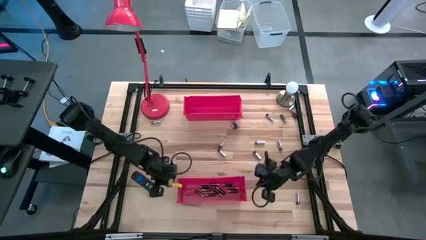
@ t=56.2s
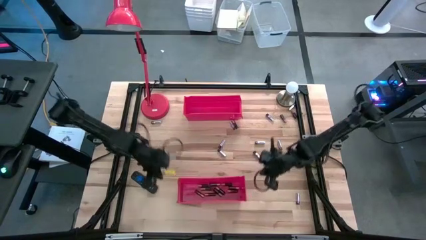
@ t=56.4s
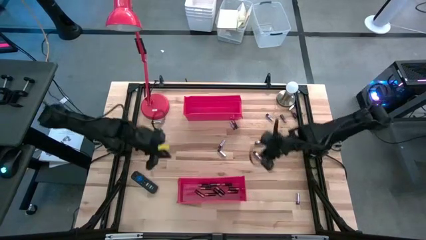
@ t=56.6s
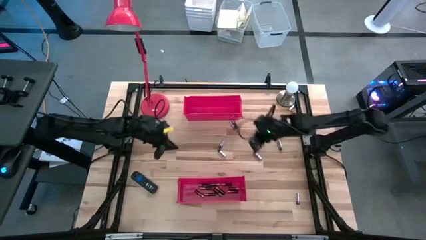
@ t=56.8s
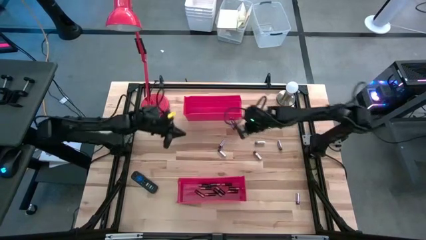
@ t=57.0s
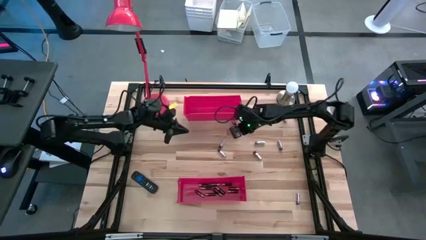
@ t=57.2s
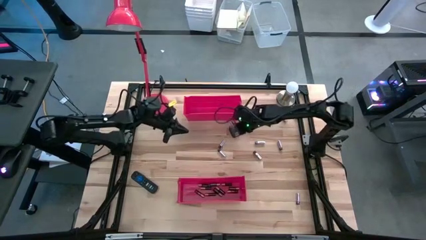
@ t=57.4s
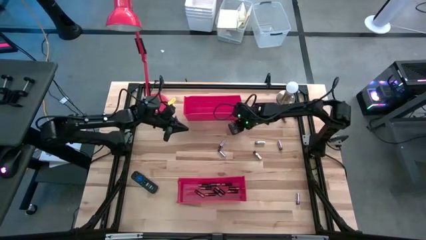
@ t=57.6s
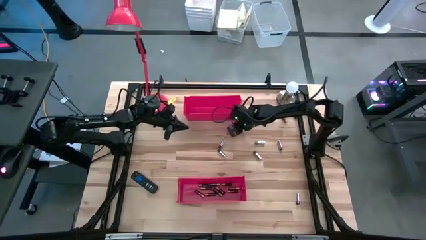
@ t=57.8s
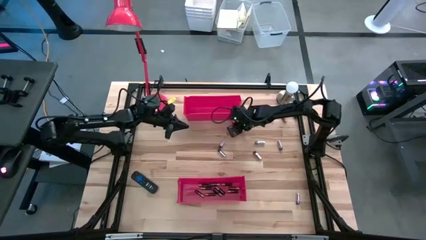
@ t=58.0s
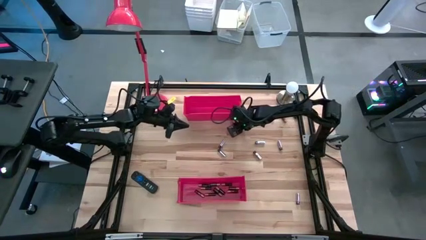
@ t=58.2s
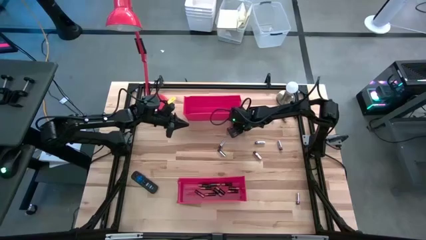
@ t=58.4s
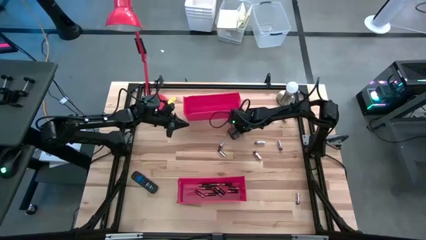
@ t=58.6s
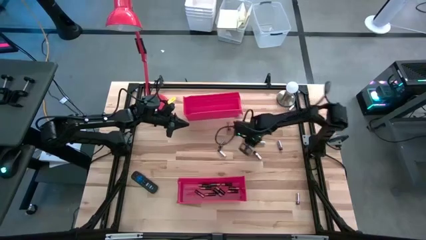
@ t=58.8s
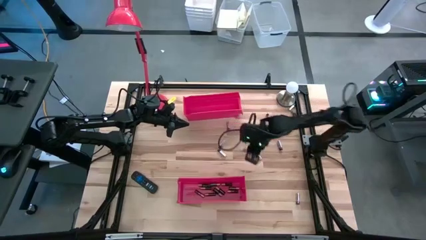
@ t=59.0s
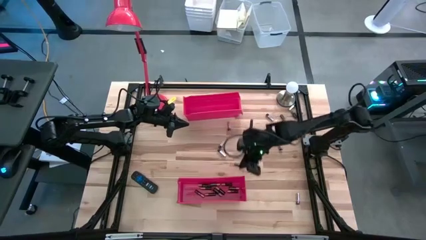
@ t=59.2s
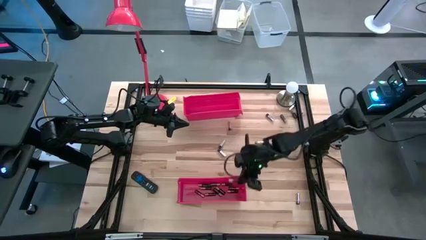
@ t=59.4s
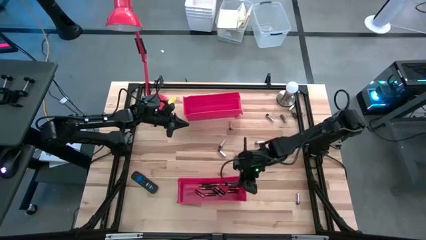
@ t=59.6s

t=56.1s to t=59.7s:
Task: Sort batteries
Put the left brown battery into the bottom red bin

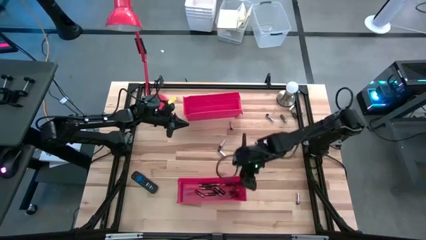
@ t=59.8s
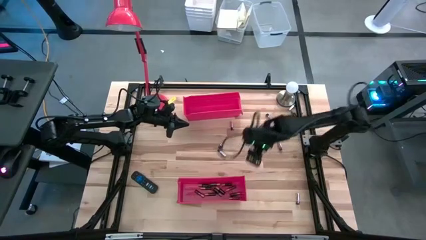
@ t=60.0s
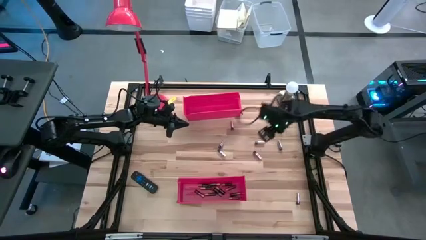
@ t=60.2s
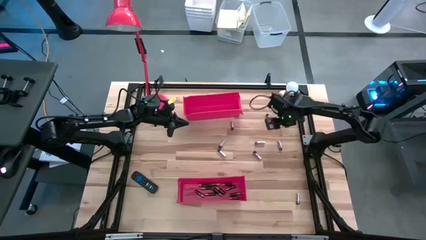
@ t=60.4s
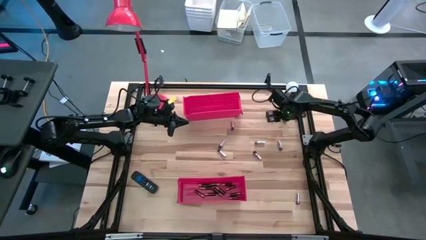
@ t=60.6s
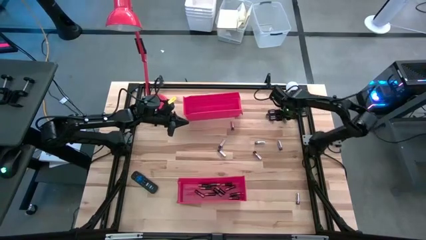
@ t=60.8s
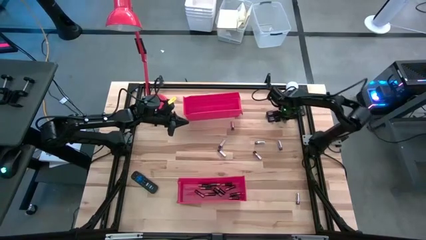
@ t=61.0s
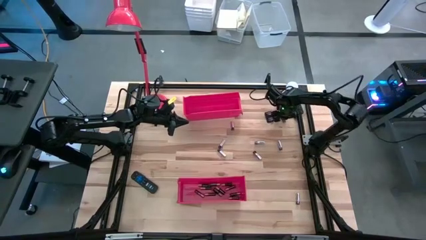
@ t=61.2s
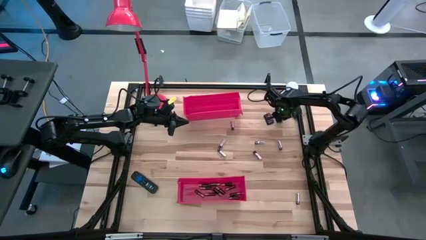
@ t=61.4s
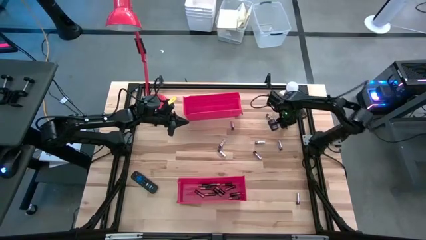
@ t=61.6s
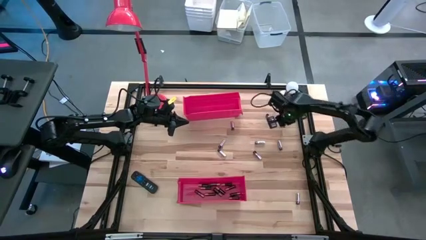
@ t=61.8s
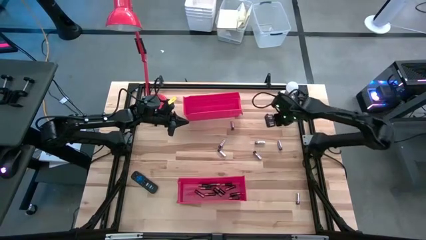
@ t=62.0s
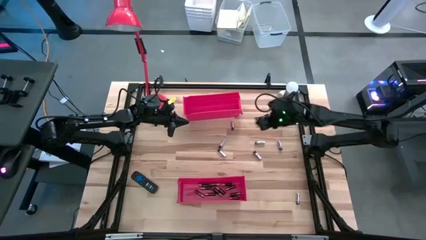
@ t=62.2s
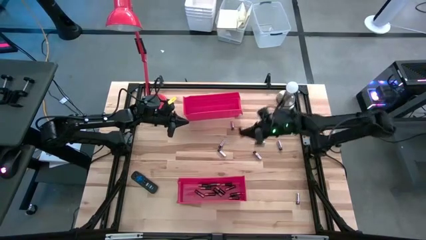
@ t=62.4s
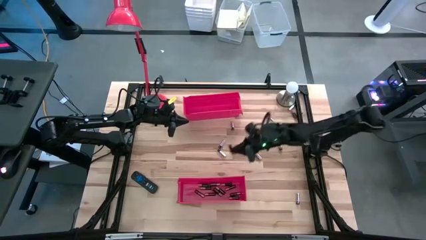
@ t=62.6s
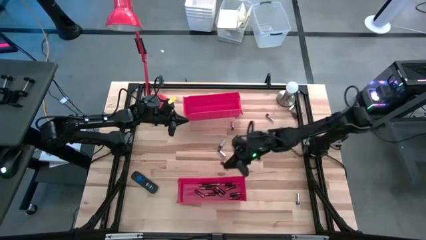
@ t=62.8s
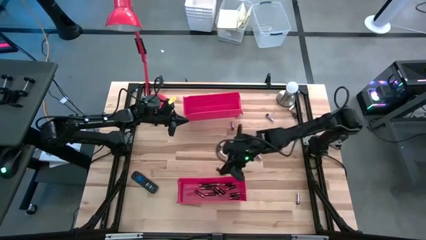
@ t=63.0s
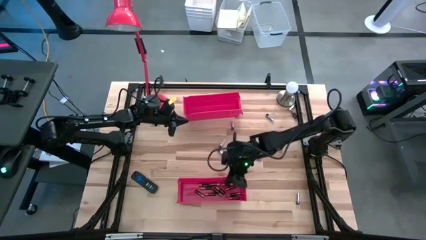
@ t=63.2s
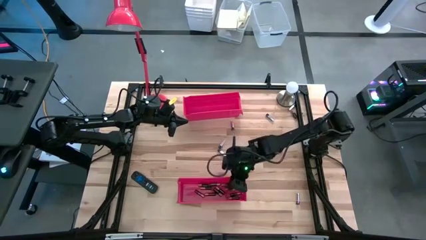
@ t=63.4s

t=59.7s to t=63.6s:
Put the left brown battery into the bottom red bin

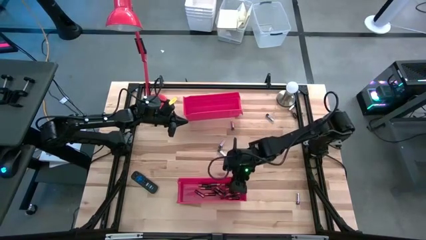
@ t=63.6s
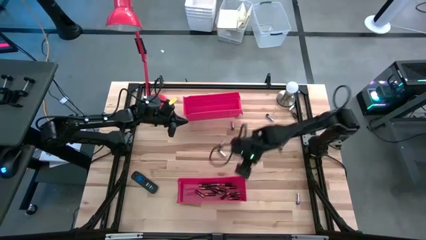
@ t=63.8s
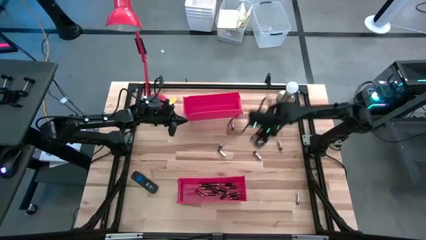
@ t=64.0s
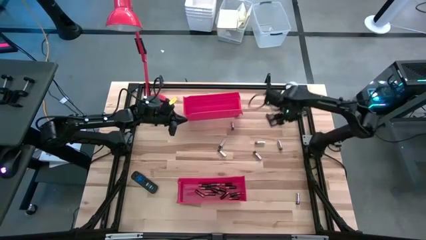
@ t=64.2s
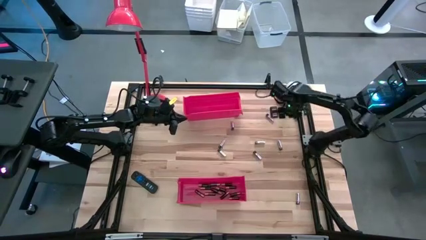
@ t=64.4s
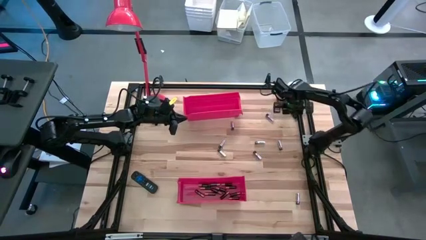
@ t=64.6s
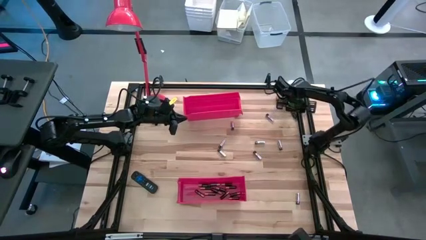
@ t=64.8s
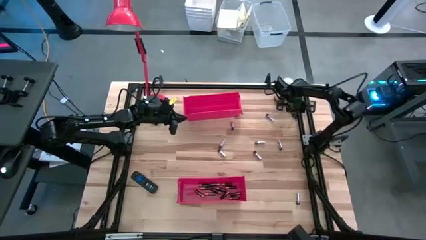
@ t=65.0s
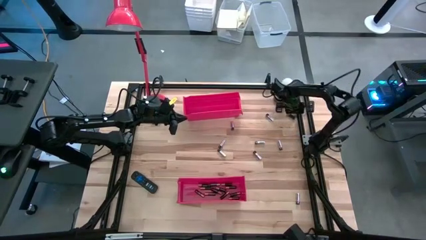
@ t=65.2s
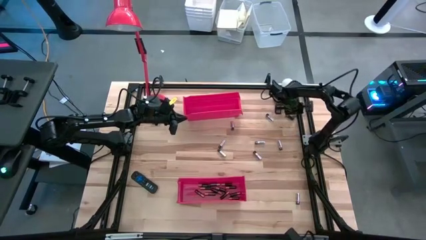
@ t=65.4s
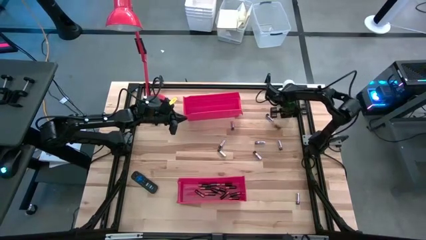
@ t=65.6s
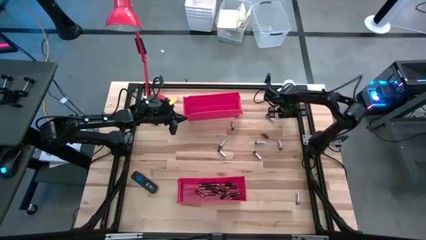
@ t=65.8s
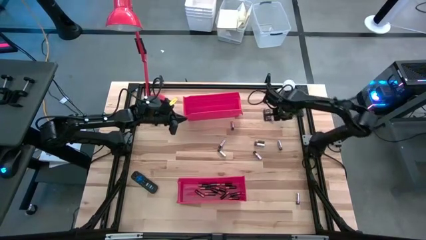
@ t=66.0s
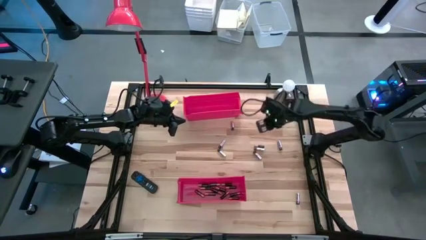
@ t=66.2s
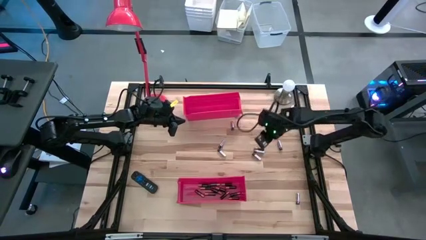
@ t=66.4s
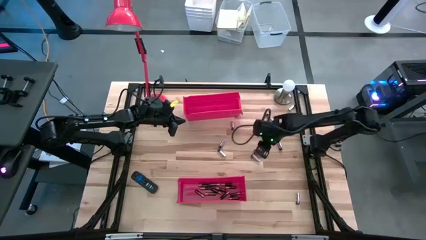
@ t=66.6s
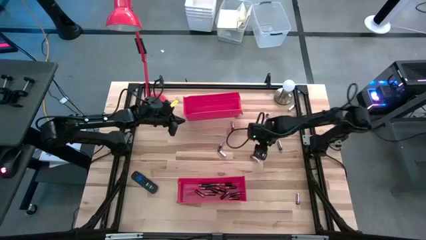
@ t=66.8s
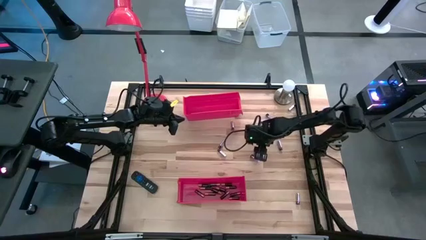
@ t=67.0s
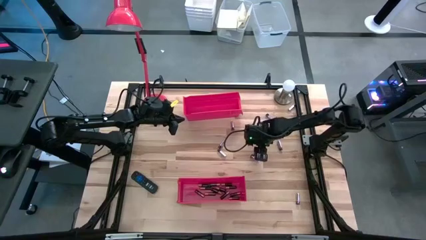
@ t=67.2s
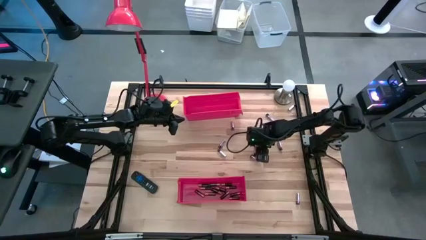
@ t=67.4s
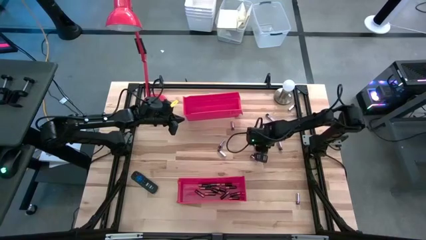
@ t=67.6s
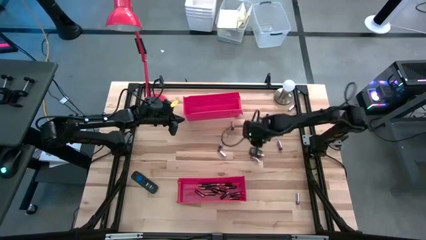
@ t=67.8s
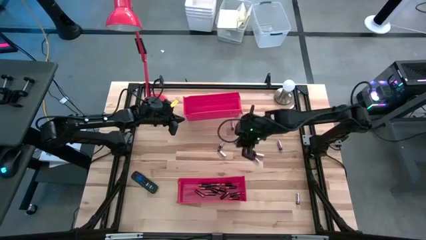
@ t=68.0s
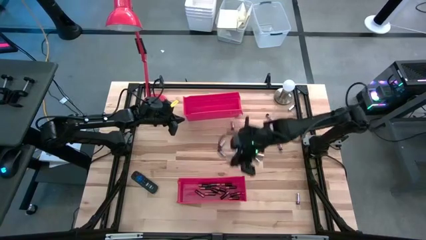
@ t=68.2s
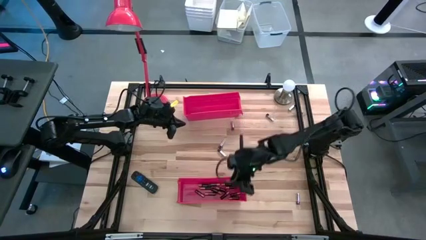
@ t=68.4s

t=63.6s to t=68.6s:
Put the brown battery into the bottom red bin

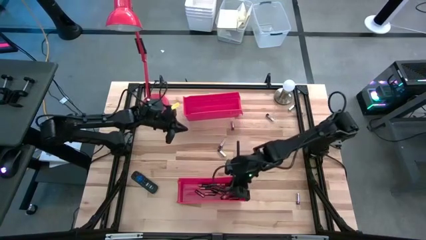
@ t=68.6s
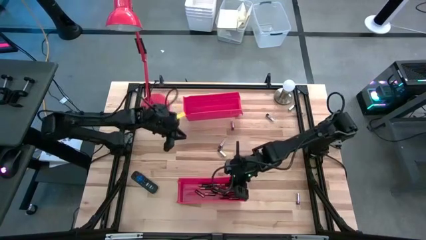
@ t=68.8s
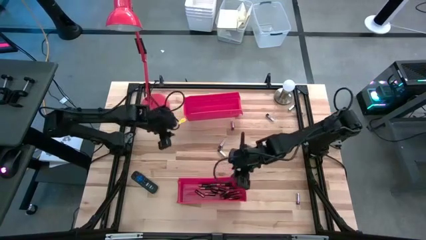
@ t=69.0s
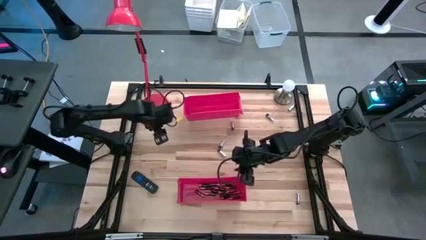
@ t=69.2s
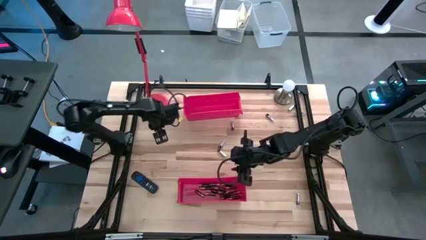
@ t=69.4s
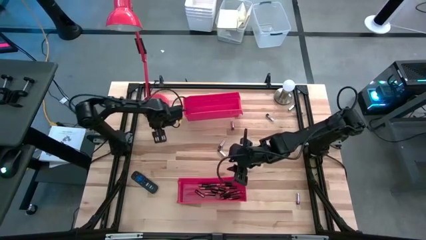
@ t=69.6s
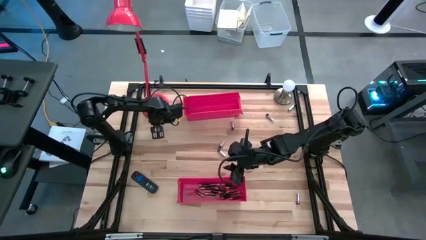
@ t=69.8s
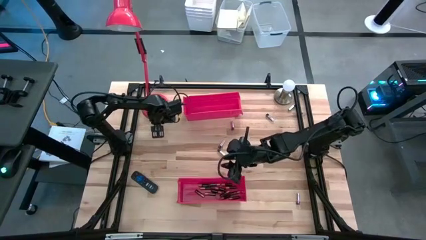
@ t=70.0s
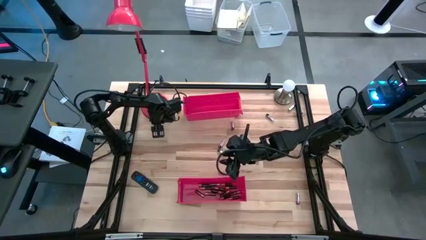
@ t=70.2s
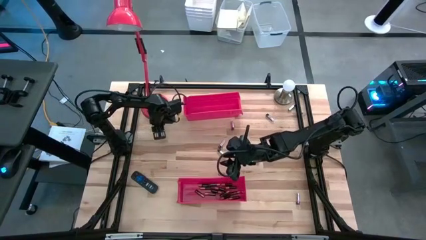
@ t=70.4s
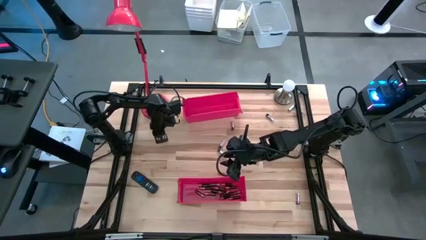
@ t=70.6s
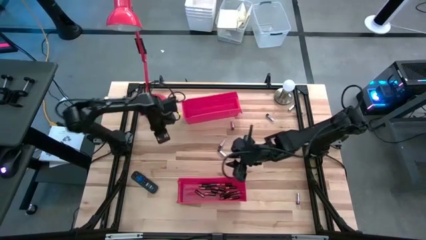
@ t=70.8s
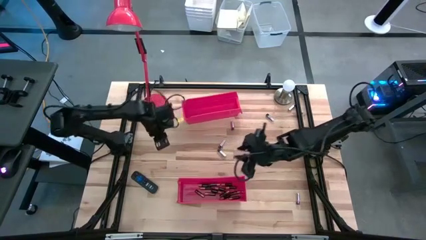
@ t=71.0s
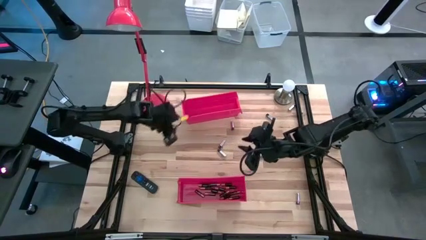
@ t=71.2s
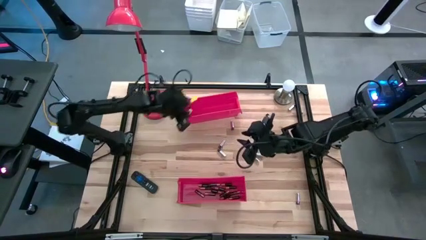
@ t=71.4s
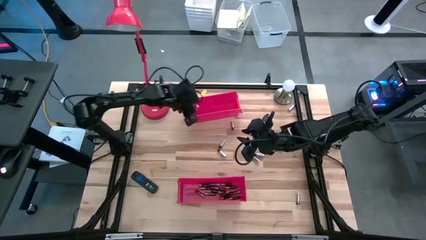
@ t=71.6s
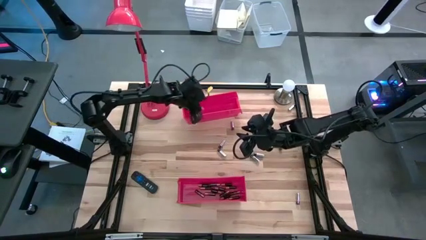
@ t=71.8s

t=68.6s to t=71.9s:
Put the silver battery into the top red bin

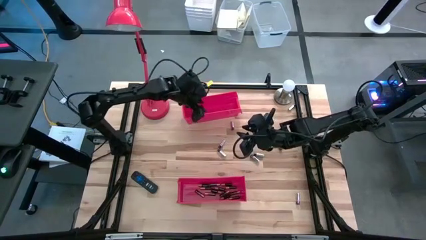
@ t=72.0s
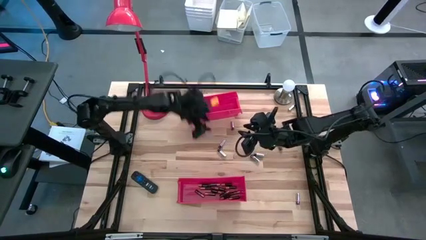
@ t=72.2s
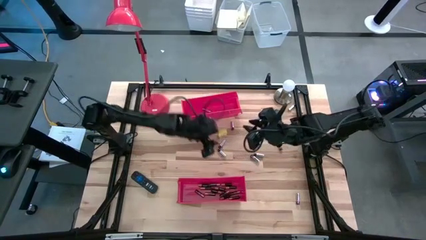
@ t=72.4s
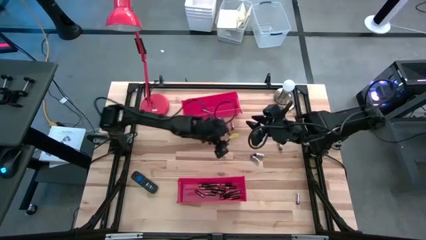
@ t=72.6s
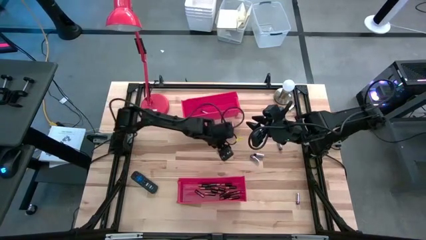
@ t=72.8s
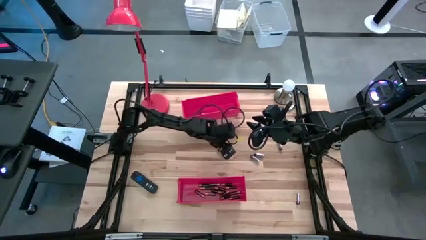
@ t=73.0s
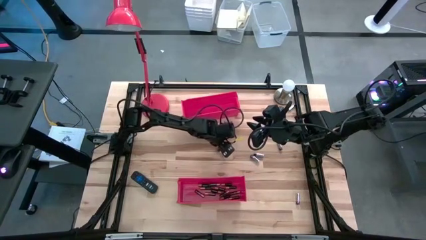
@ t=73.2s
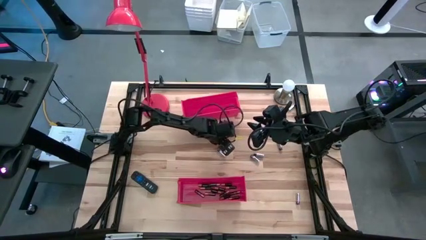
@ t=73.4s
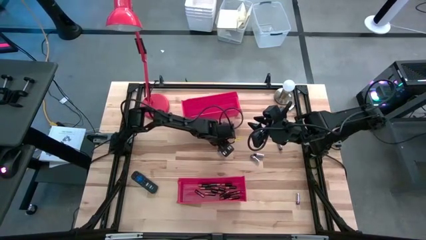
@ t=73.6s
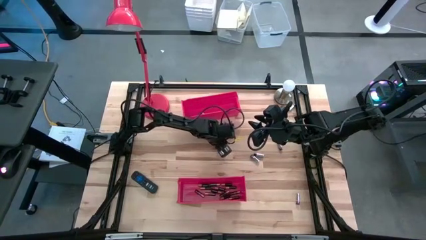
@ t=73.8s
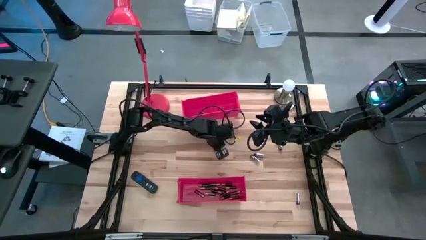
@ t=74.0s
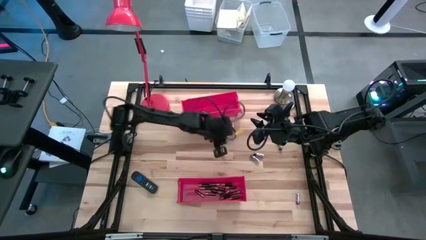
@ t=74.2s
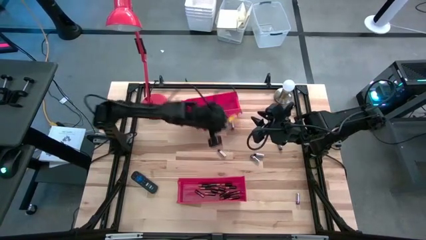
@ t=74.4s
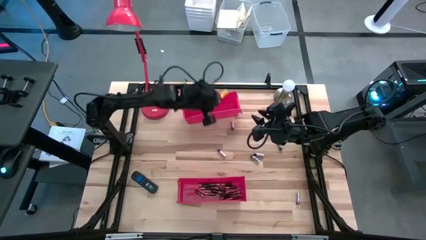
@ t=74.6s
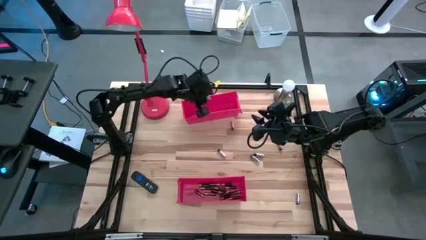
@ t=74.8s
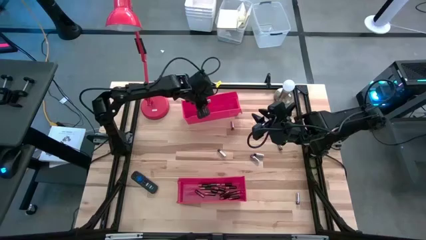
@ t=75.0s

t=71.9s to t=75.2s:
Put the silver battery into the top red bin
